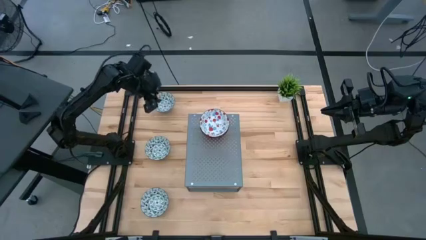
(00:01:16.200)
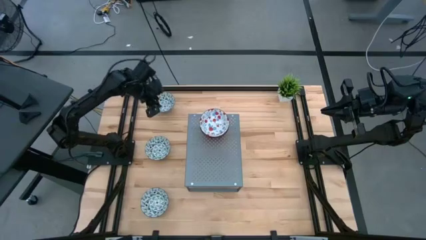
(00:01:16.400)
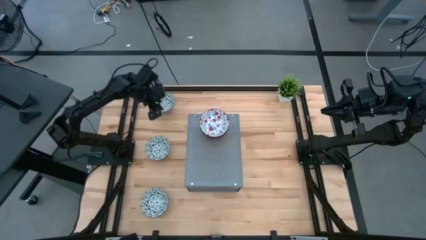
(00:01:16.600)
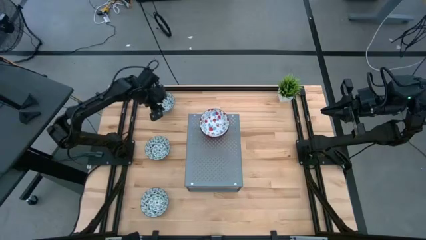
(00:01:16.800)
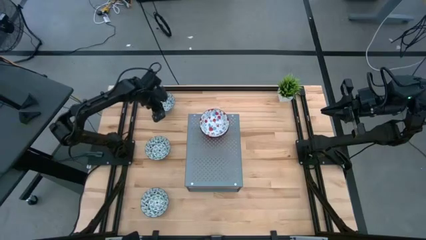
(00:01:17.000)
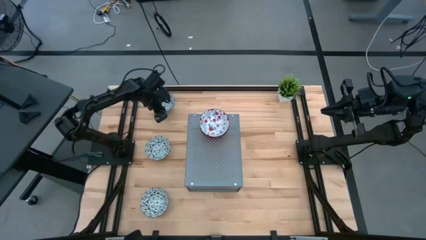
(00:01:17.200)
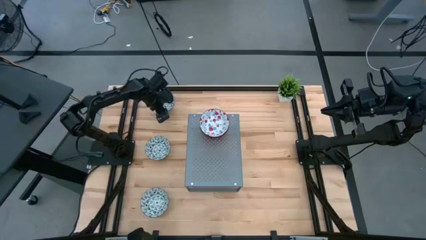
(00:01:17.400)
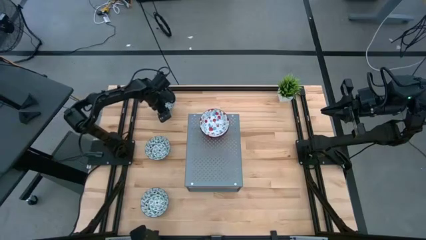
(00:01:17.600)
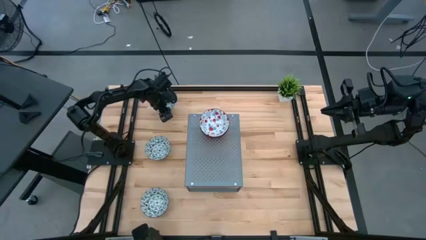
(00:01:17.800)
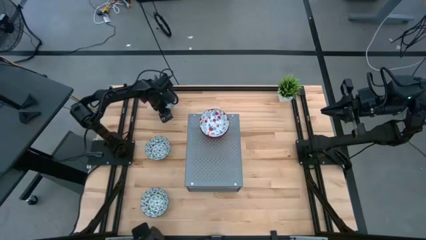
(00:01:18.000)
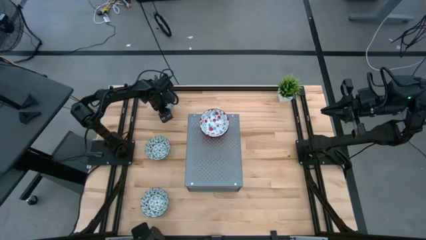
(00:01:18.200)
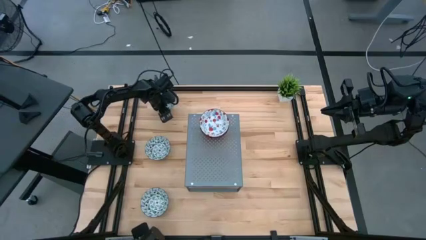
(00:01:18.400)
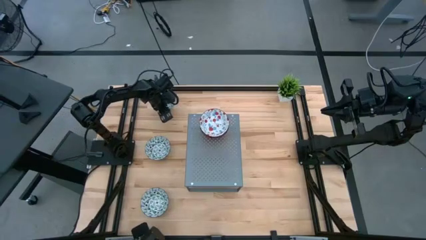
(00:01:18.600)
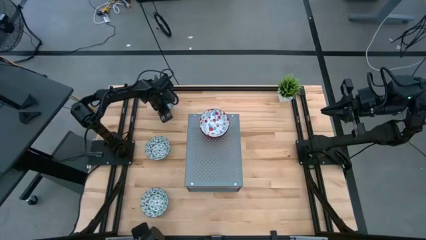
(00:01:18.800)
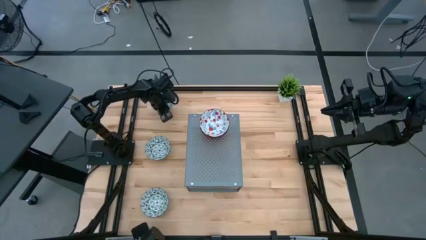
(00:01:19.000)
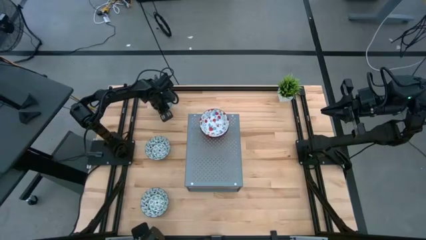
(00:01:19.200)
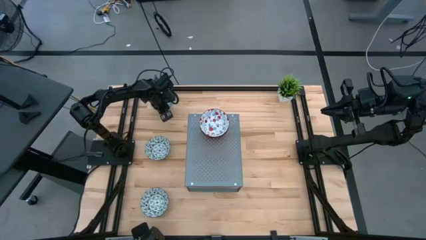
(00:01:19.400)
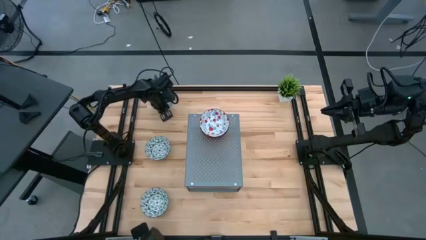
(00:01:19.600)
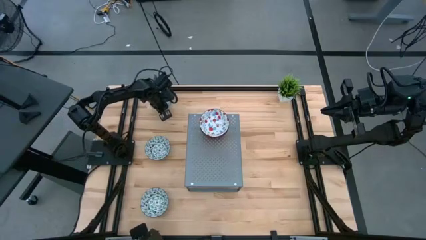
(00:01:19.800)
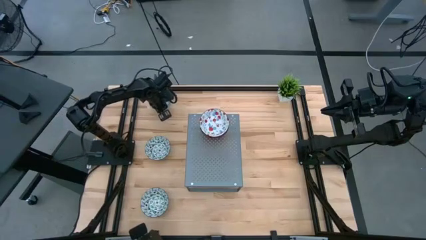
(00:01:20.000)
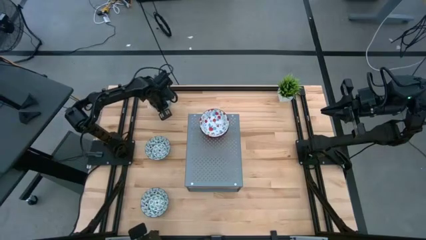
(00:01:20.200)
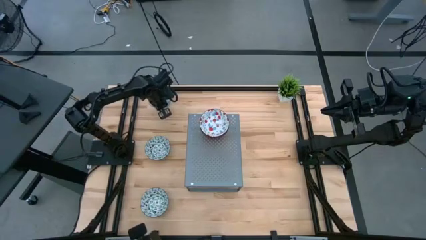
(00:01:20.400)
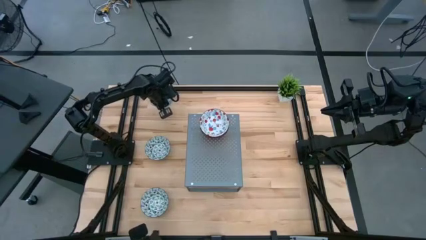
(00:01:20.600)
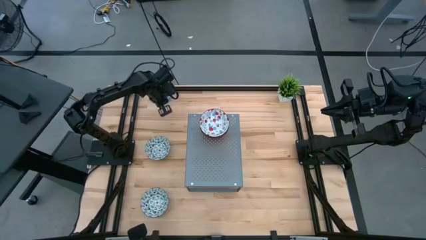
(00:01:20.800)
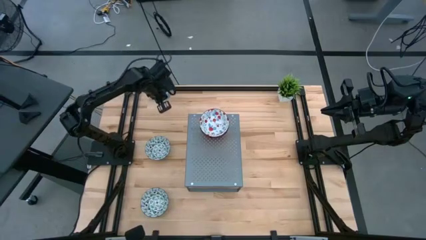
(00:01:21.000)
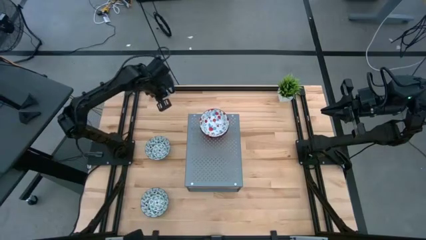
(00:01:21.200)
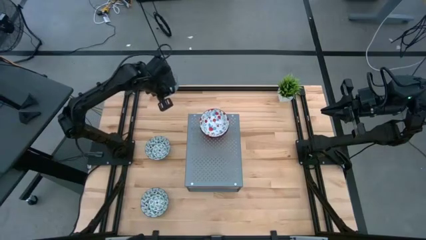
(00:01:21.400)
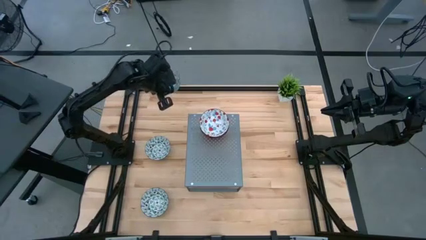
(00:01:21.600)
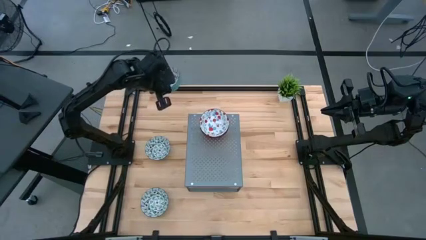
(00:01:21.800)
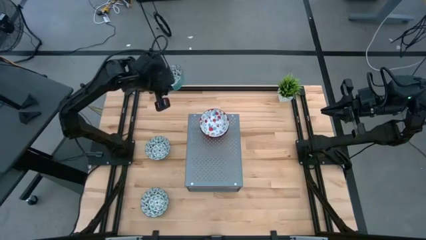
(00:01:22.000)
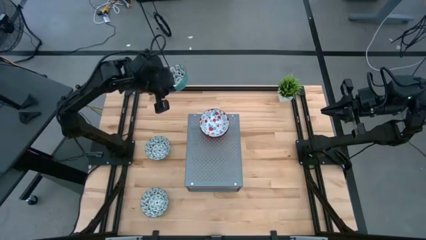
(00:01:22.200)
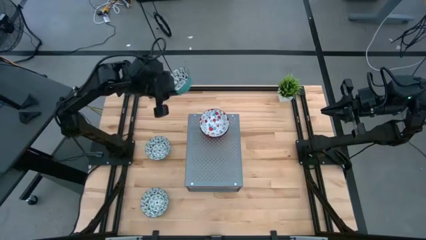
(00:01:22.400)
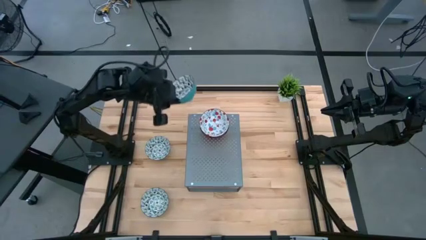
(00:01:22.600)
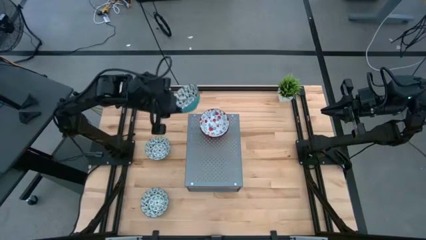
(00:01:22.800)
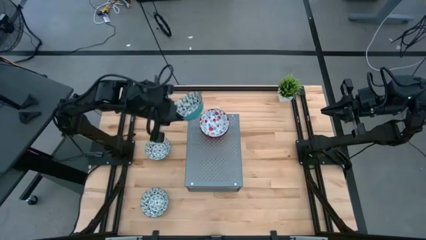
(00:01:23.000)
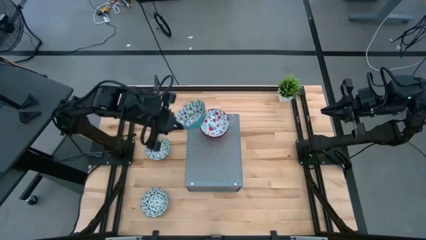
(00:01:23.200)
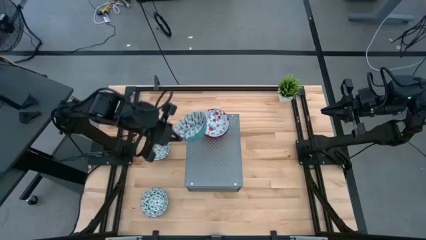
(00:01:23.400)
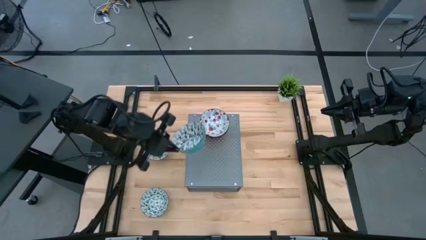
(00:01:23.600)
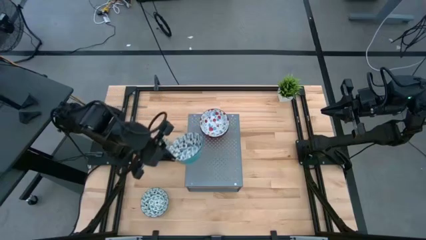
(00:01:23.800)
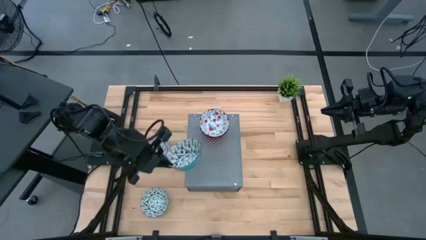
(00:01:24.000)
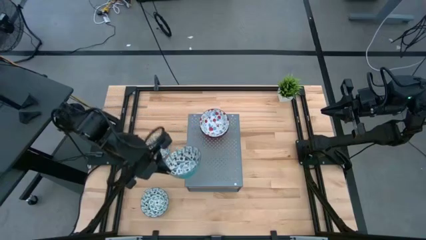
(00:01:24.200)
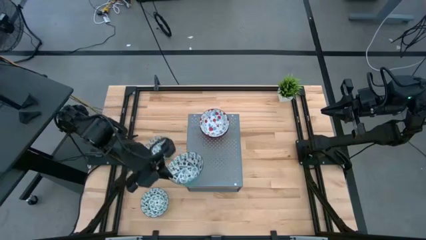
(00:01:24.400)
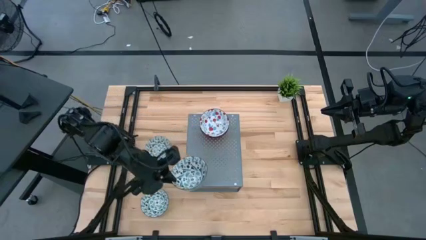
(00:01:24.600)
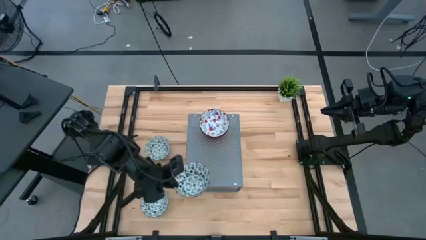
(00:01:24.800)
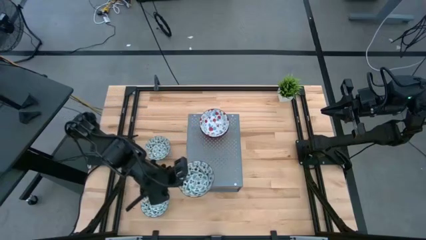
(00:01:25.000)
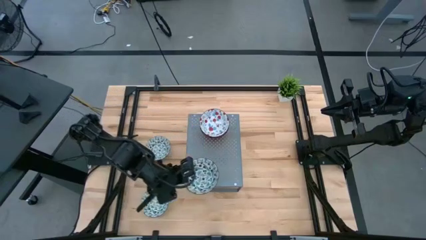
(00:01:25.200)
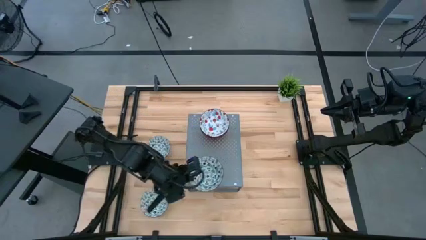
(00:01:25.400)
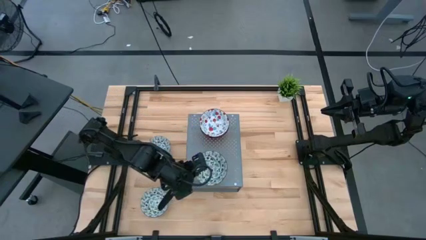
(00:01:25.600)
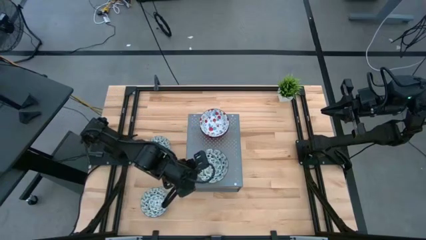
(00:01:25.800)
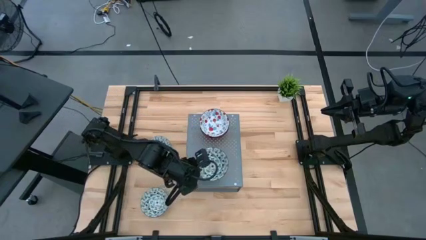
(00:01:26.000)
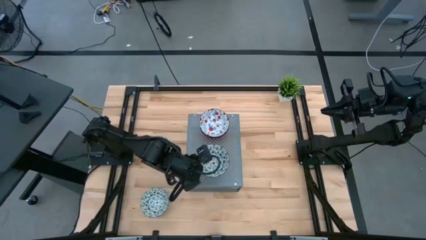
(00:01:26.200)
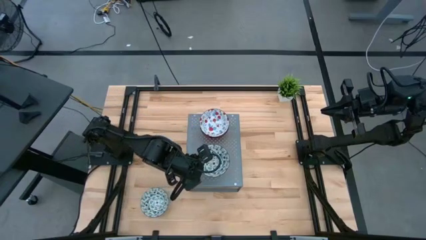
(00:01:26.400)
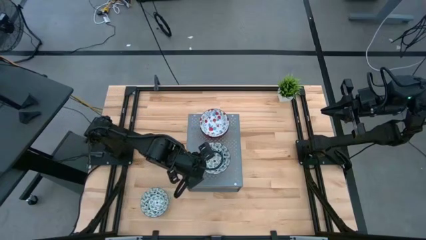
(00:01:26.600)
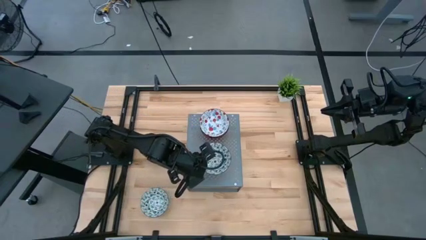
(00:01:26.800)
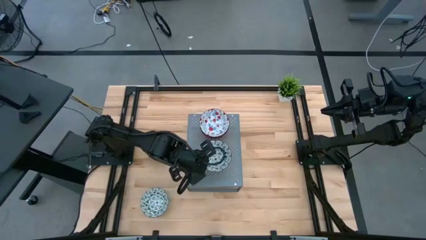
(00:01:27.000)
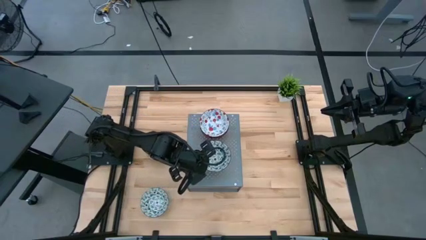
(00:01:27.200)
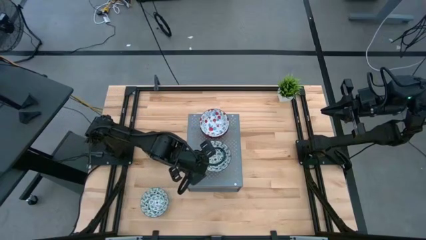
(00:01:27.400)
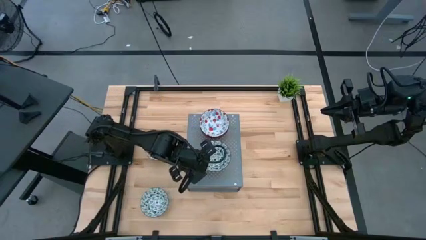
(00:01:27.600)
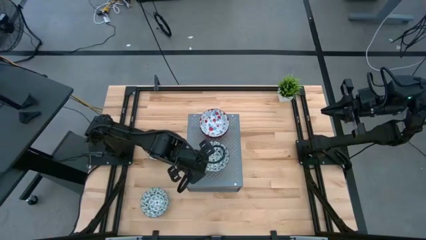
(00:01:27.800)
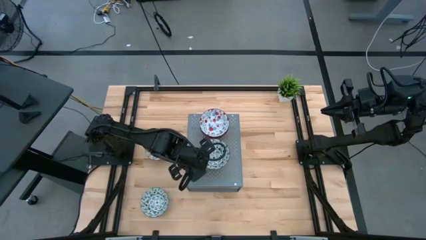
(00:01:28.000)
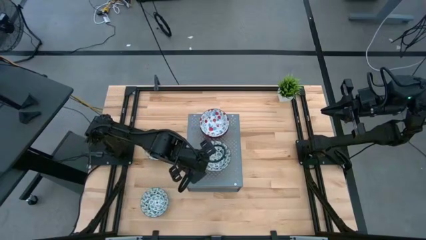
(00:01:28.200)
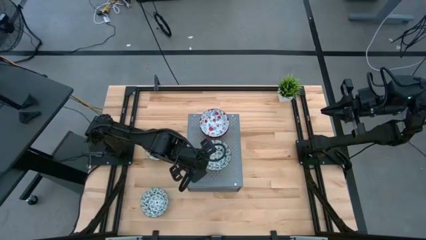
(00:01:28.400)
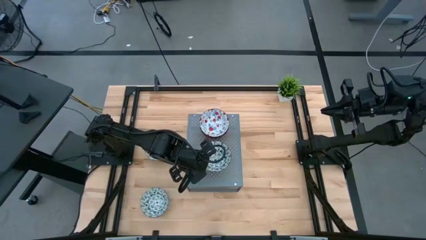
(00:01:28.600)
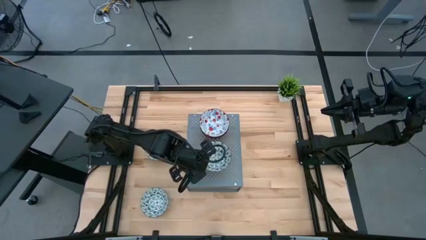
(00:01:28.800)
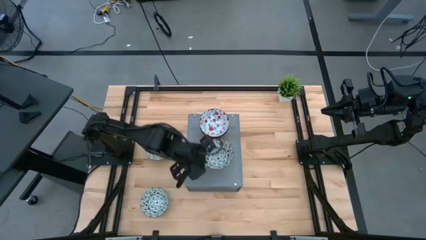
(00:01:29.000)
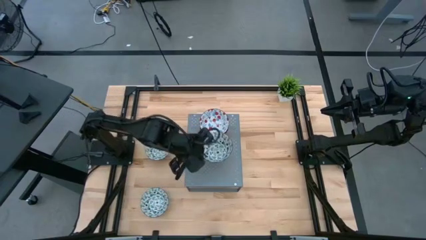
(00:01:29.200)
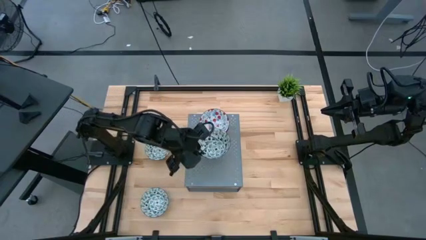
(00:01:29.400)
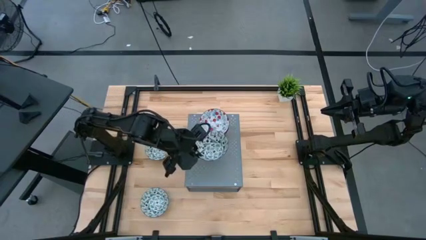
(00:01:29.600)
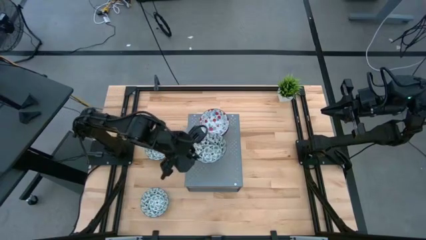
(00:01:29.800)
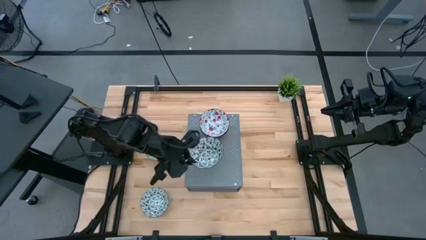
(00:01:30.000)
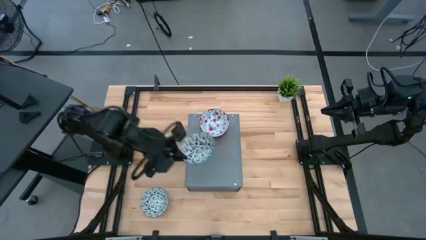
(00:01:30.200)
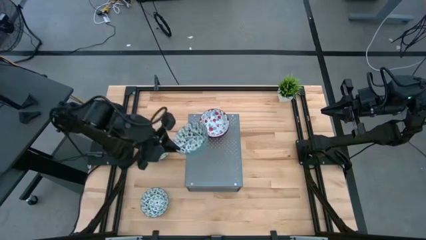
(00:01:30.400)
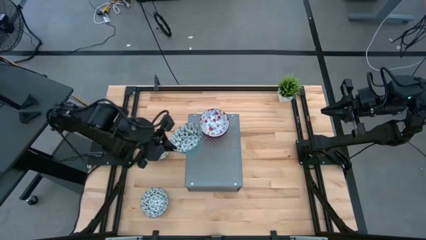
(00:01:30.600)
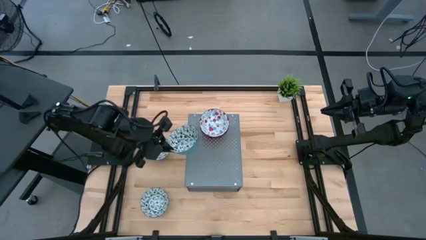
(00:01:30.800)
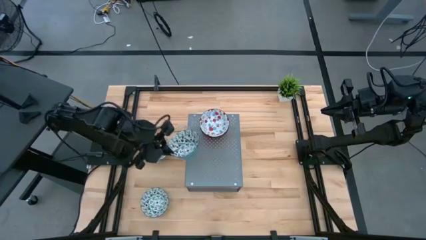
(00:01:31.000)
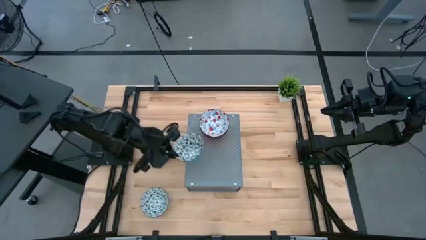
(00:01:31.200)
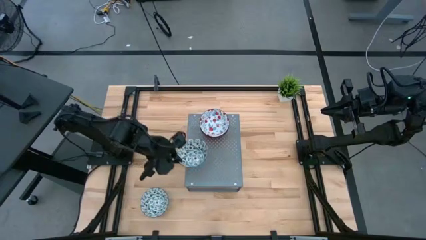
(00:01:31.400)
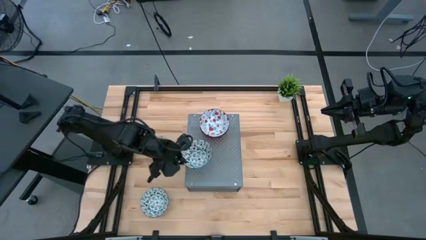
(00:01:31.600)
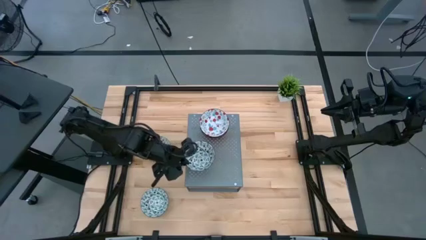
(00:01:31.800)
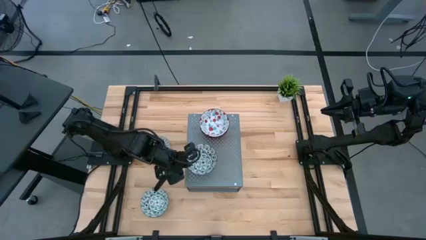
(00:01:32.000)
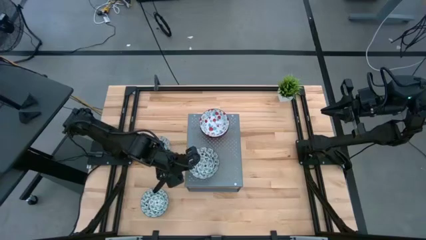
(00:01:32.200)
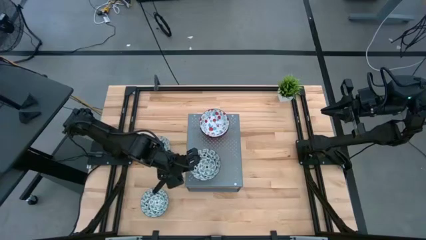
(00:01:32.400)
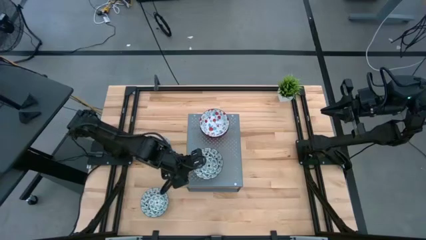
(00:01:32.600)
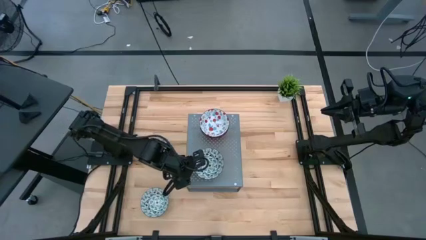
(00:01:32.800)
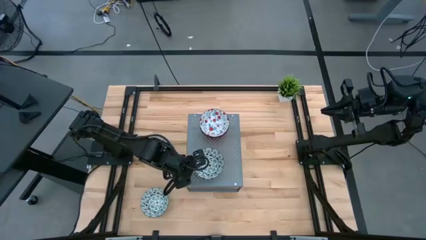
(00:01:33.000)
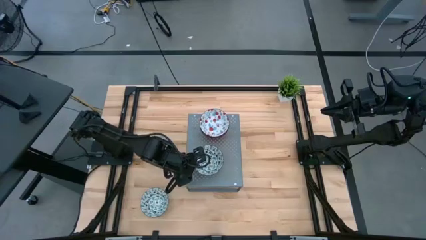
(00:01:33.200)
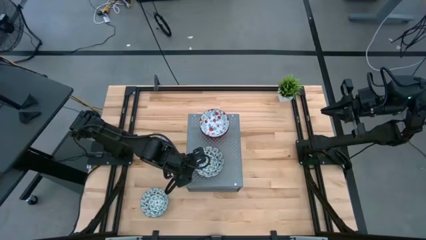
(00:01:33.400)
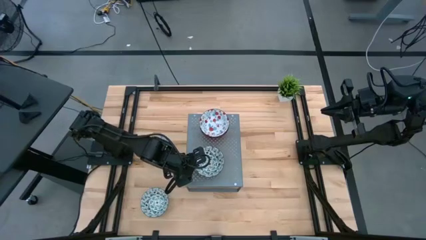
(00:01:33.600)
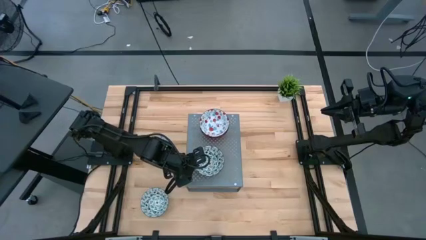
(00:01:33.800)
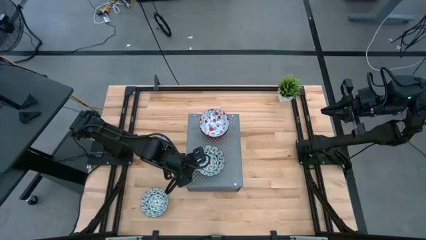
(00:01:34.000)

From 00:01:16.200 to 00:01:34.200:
Task: Pick & Place Mini bowls
Put the top green bowl on the shelf
